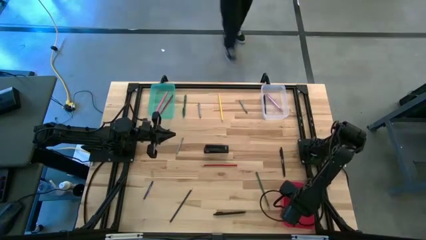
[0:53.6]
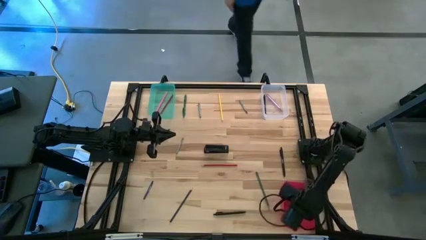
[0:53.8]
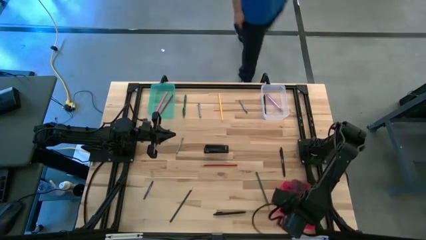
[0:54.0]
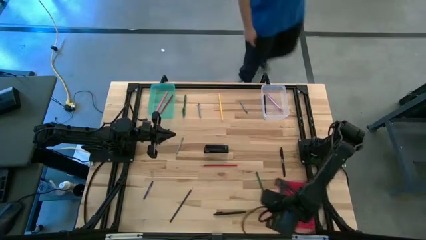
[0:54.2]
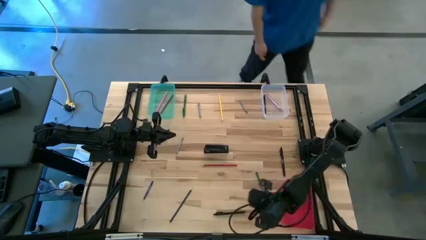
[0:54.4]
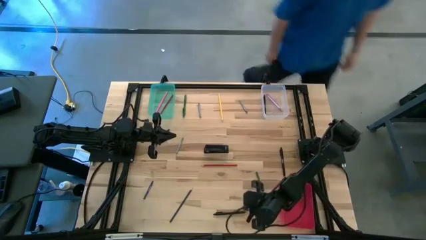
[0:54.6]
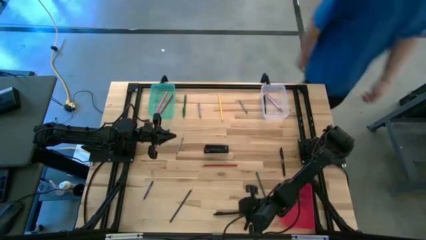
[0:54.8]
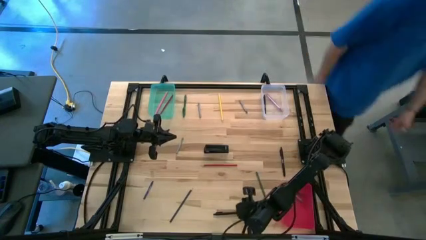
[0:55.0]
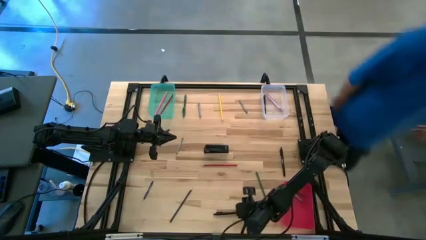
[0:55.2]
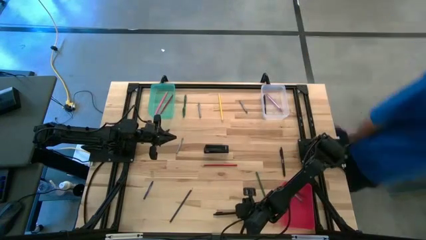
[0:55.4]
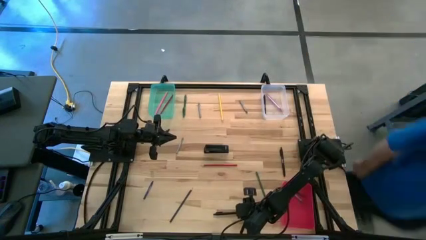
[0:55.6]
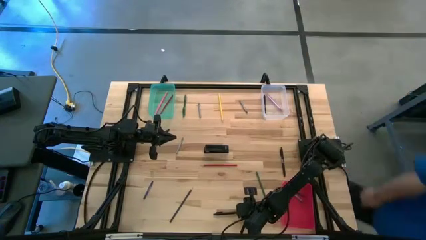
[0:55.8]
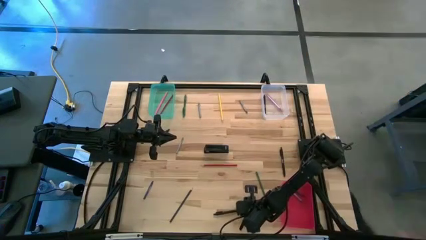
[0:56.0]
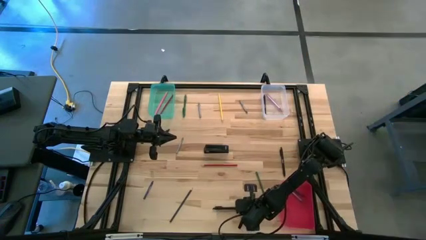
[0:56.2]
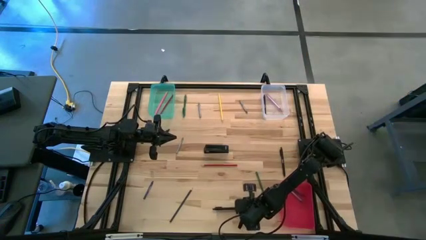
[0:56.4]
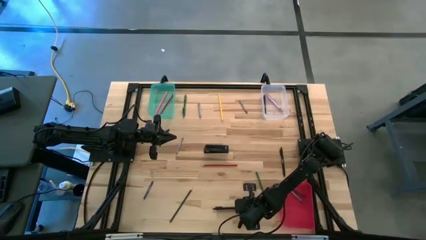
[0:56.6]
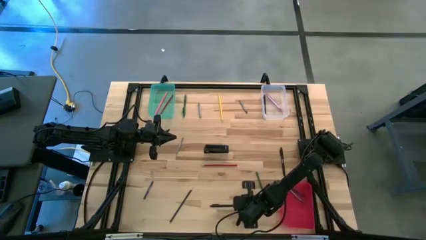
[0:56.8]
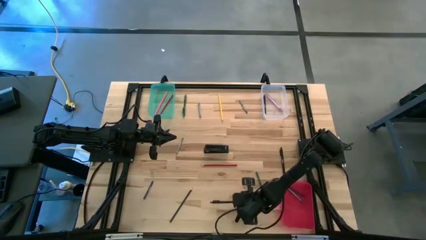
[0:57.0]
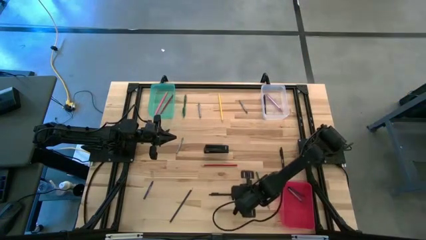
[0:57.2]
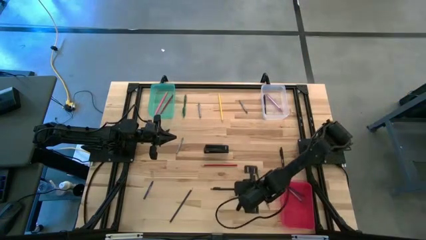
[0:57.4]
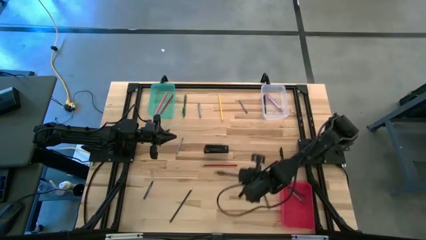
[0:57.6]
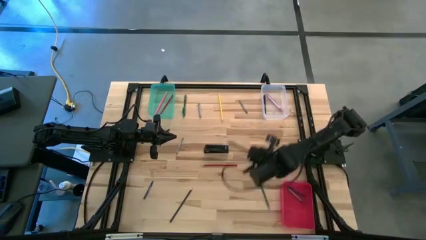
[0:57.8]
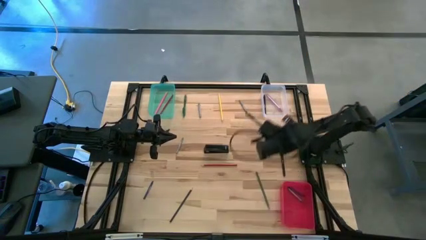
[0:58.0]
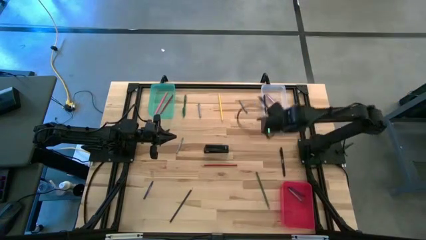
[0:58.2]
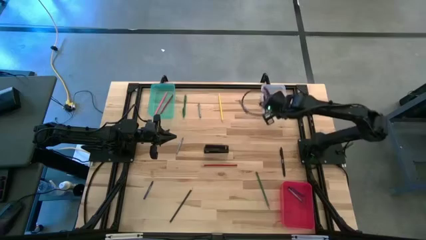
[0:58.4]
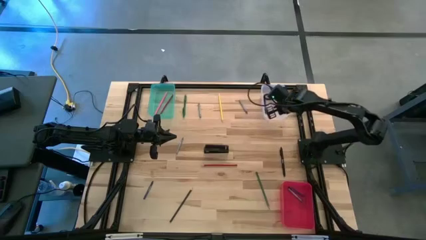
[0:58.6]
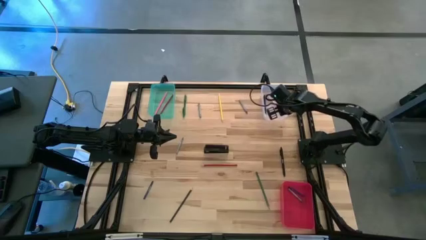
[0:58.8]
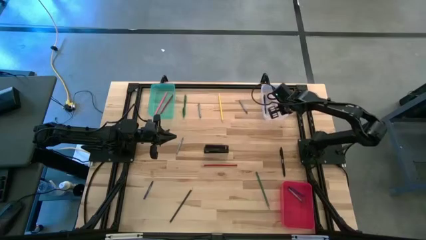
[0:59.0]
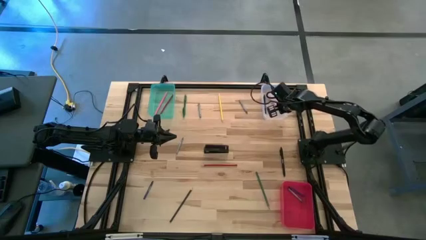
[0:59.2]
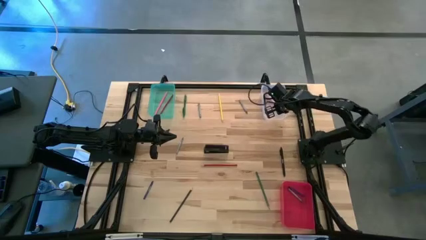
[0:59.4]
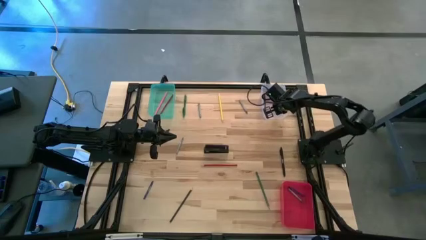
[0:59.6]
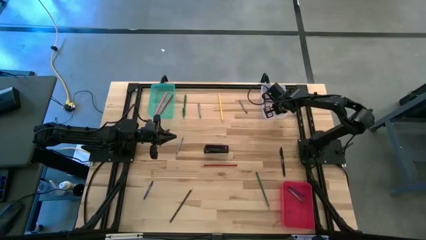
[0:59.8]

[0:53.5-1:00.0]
Task: Sort crayons/erasers/pens/pencils in bins
Put the black pen into the transparent bin

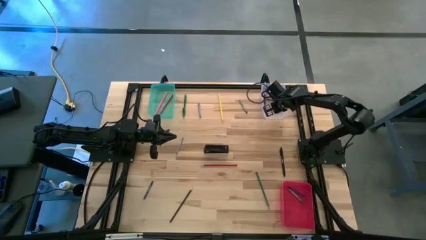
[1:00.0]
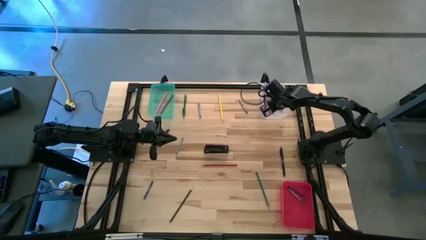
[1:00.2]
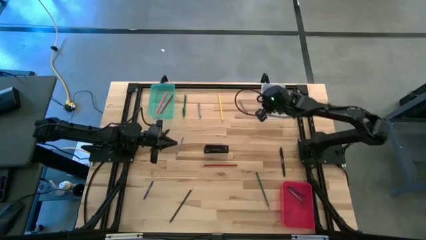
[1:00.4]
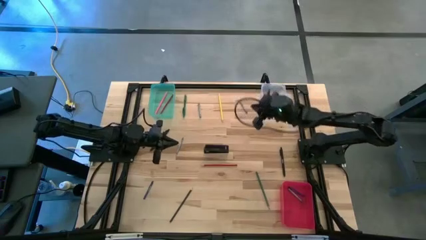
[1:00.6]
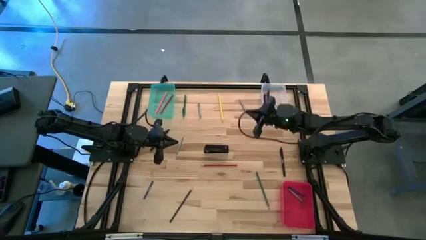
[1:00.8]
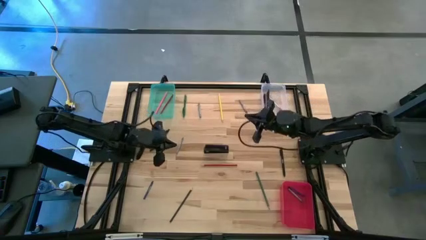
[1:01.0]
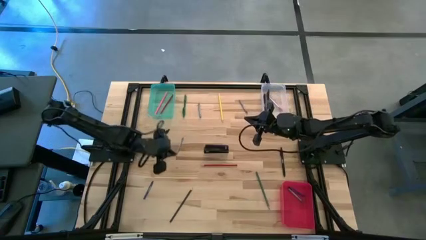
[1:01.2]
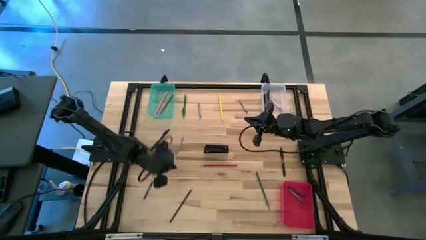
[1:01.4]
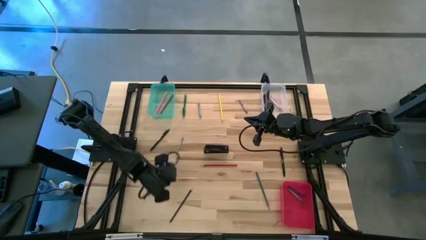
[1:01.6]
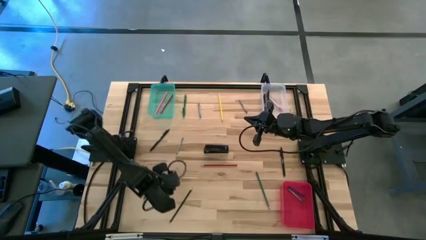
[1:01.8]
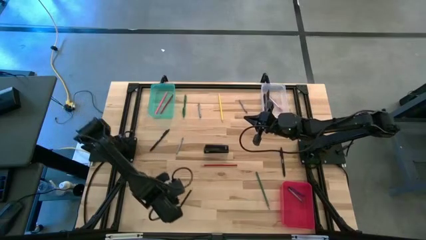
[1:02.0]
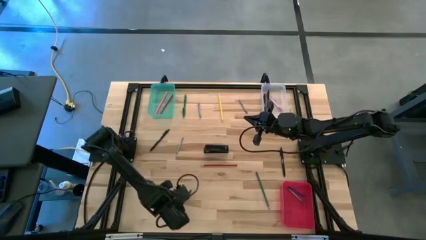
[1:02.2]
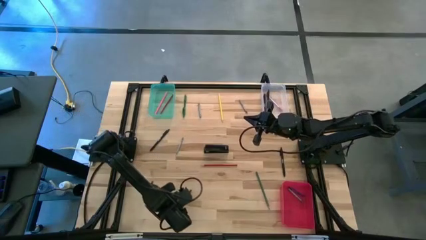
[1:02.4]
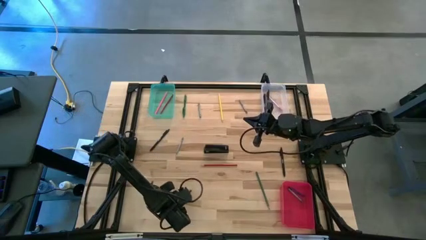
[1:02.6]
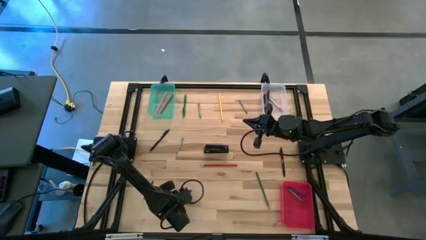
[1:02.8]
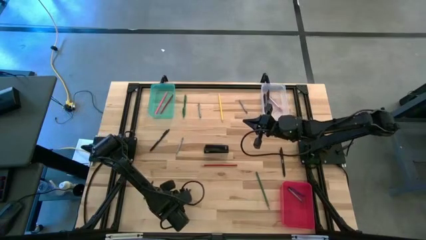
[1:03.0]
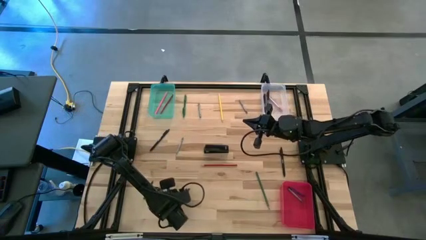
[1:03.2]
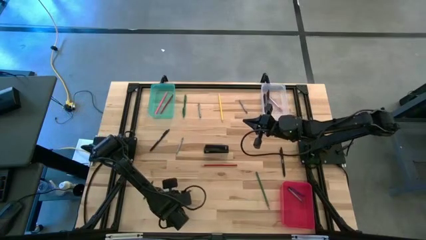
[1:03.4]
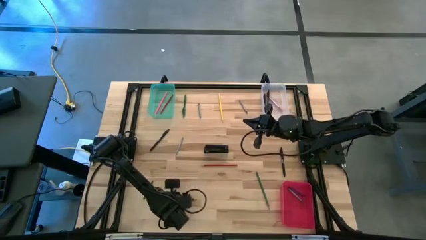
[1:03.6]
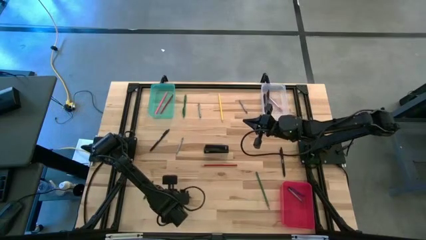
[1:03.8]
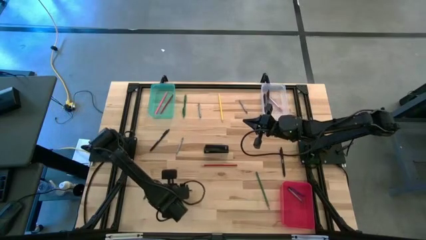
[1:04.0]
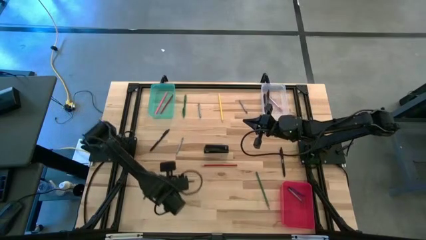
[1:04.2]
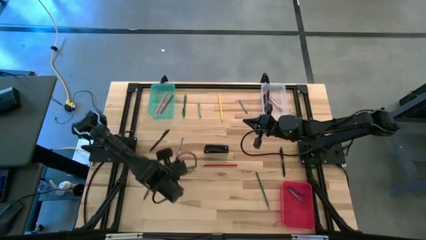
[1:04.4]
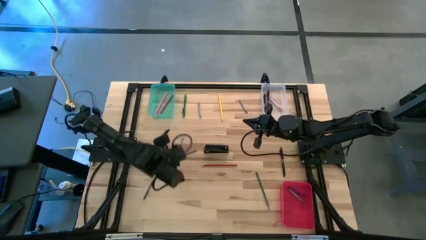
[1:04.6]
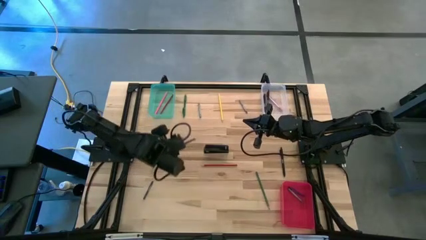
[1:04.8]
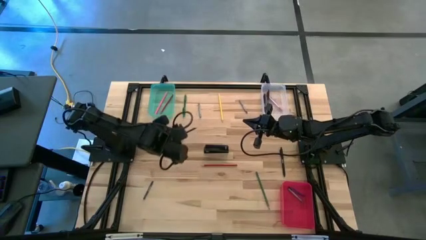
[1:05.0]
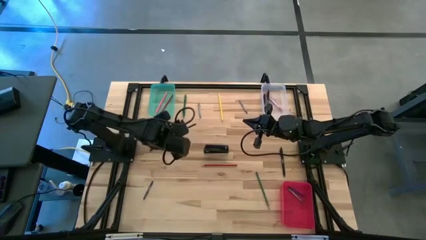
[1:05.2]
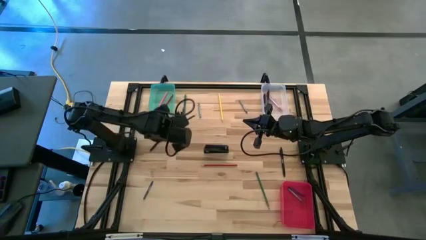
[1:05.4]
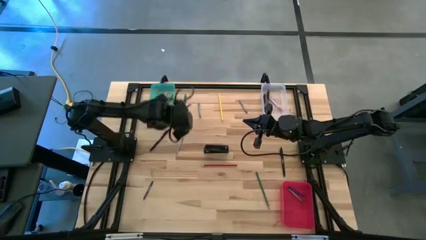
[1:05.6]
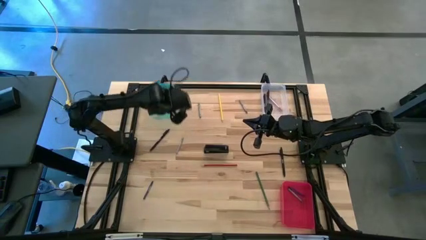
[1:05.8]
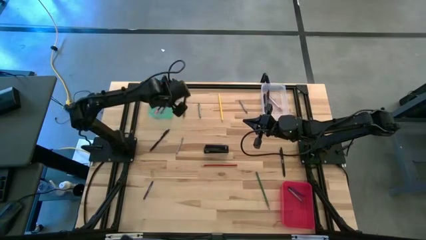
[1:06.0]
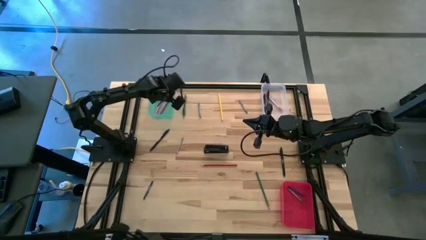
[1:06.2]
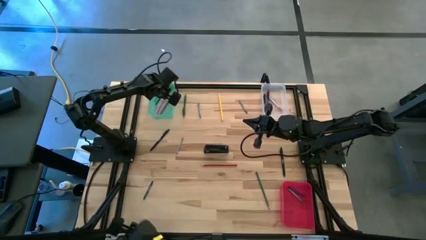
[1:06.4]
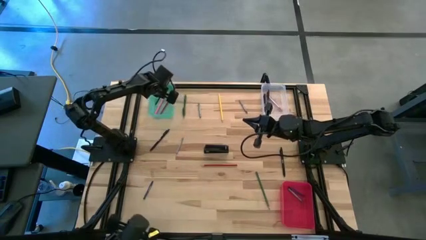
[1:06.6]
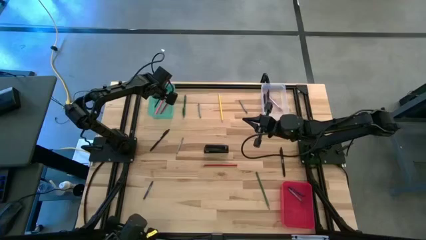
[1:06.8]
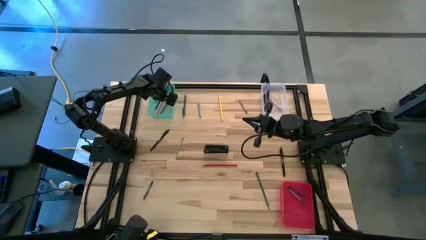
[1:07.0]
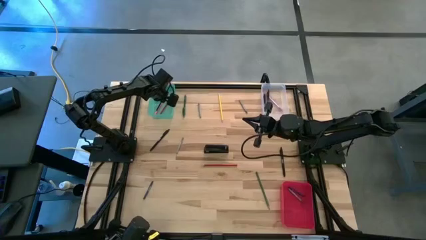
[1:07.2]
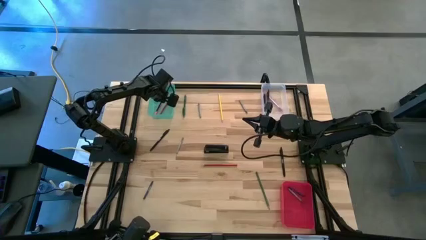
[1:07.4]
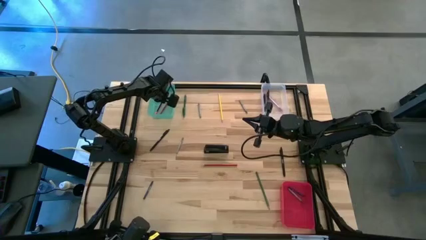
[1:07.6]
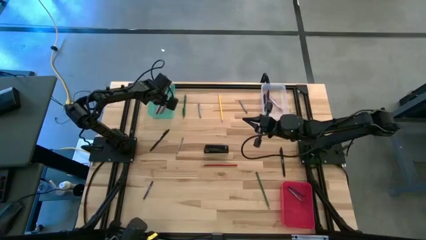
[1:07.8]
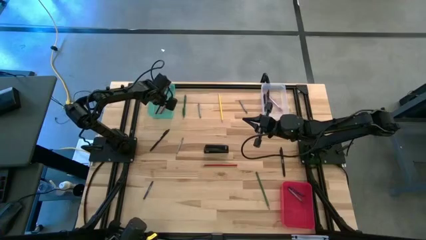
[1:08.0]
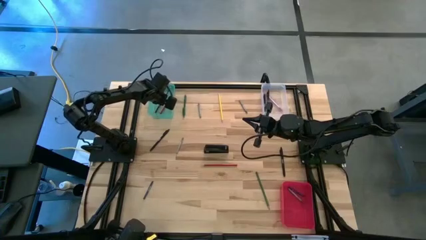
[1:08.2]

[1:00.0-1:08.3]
Put the black pencil into the green bin

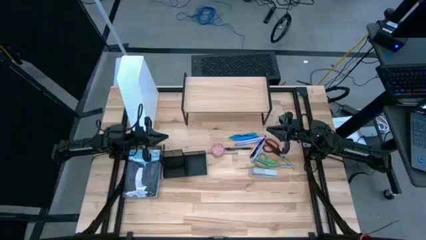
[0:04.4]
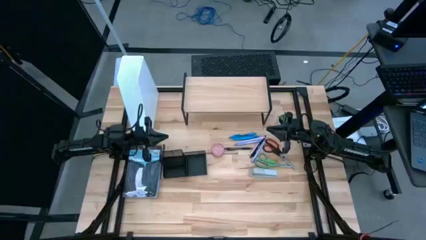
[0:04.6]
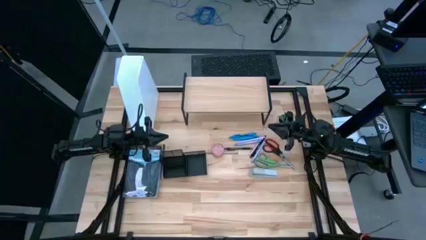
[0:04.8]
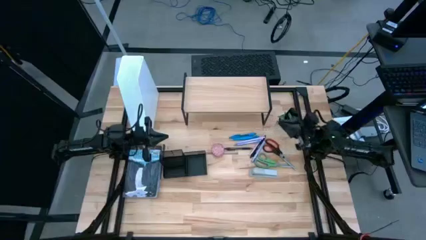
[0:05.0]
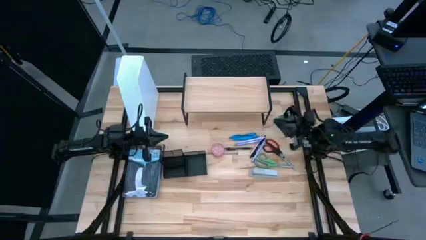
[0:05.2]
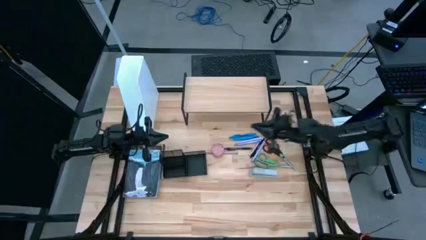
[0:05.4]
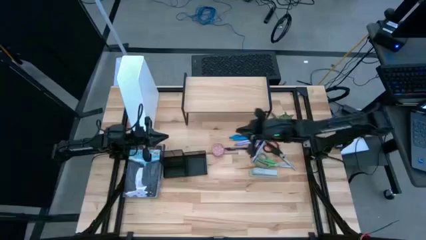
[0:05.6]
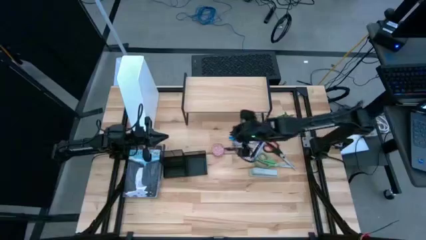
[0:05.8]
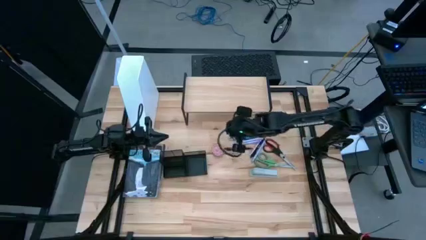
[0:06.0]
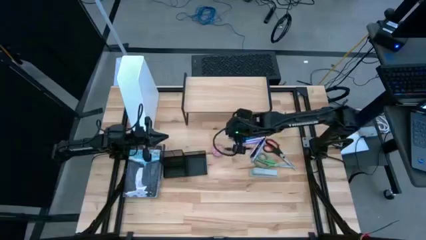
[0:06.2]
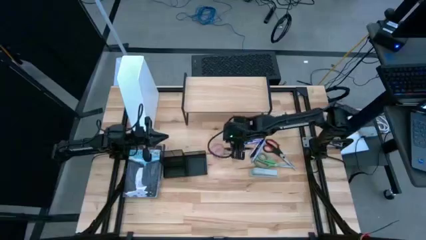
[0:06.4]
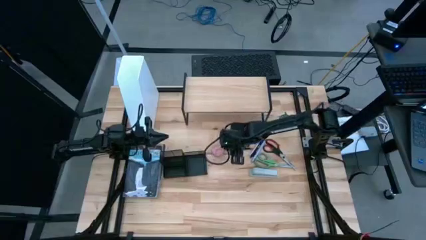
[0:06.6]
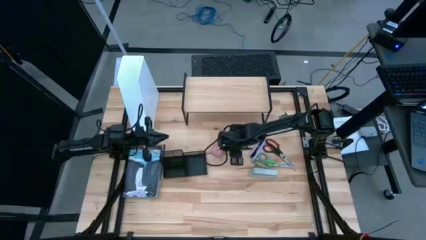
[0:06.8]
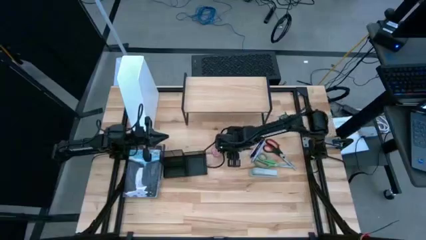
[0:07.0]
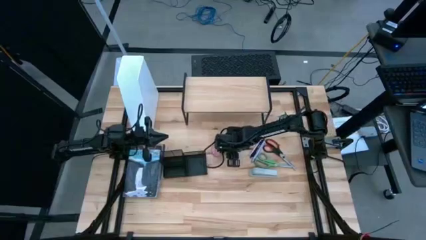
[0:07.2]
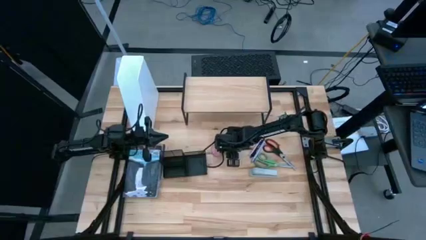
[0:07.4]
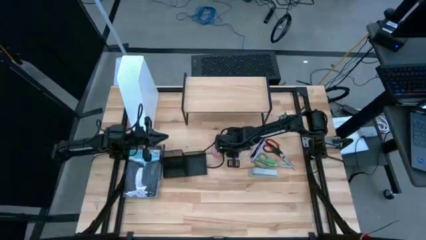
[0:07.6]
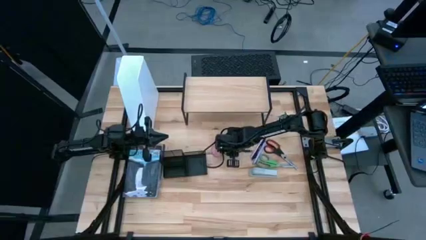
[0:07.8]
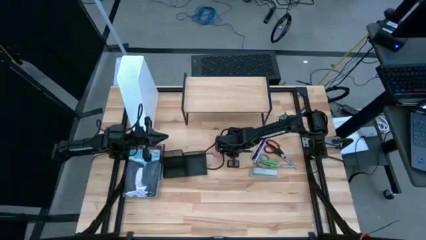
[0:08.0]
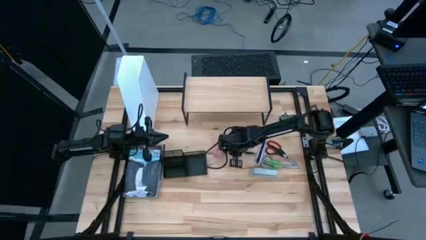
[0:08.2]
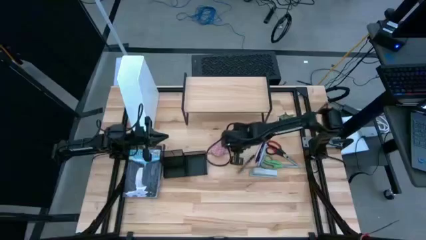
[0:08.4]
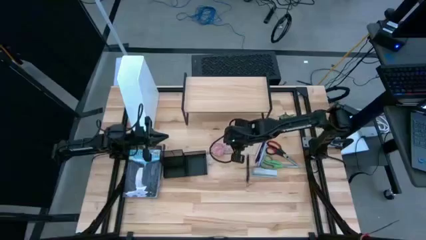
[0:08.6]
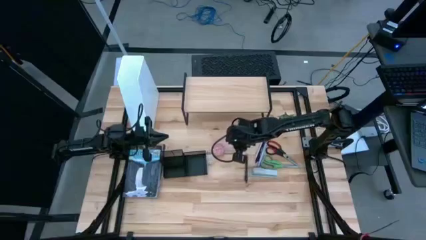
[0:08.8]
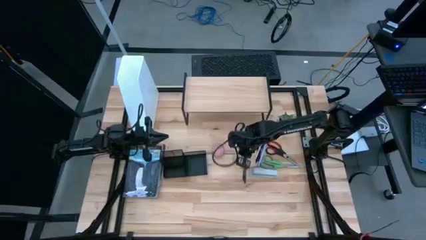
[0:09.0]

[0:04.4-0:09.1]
Task: Stock shelves
Put the black pen into the desk organizer
